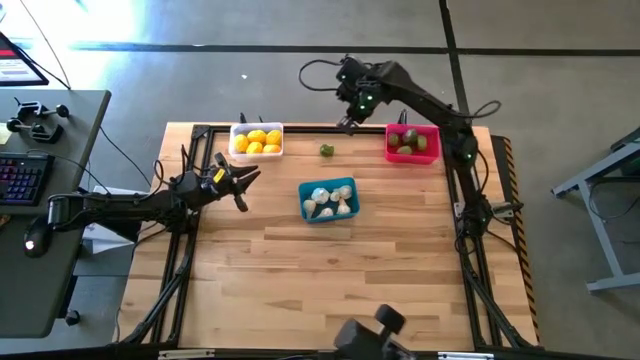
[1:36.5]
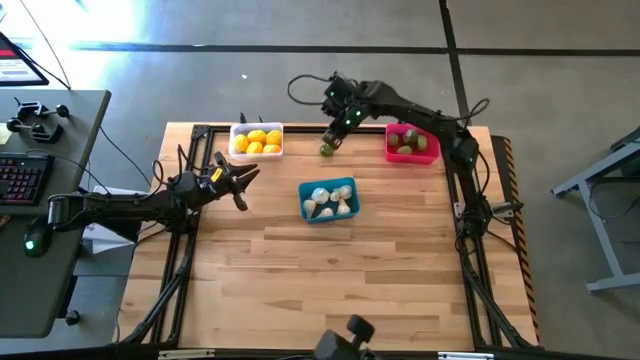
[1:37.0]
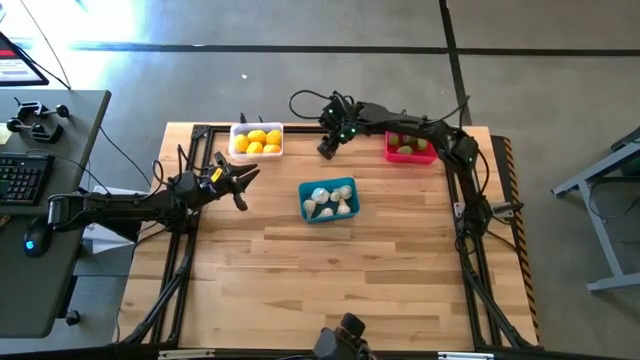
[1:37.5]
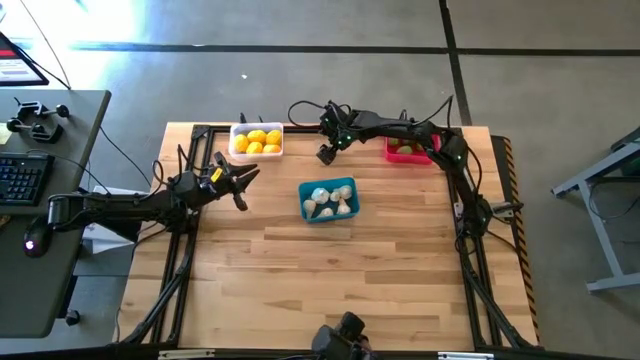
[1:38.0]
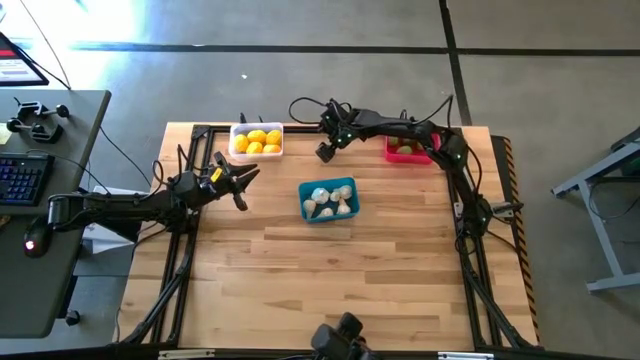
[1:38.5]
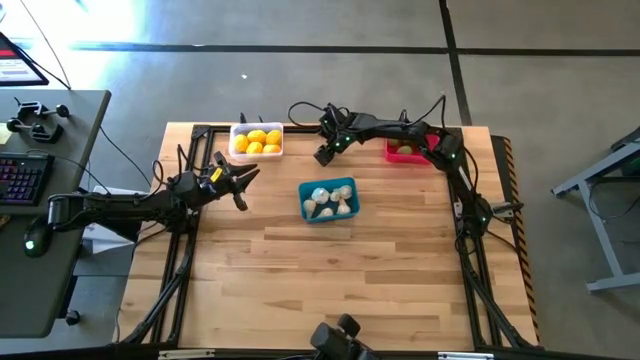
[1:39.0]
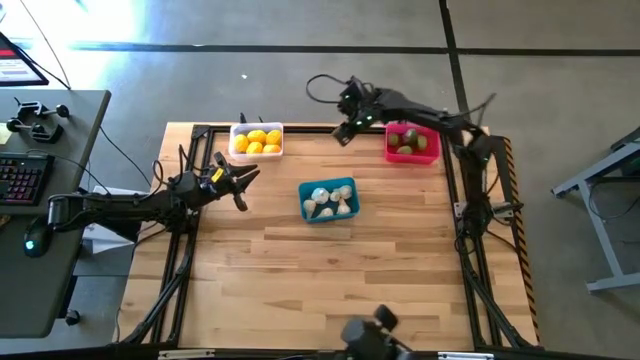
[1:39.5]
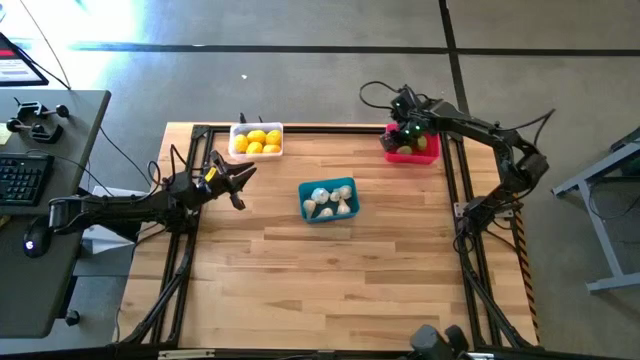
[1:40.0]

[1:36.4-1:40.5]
Task: Sort produce into baskets
Put the green lime into the pink bin

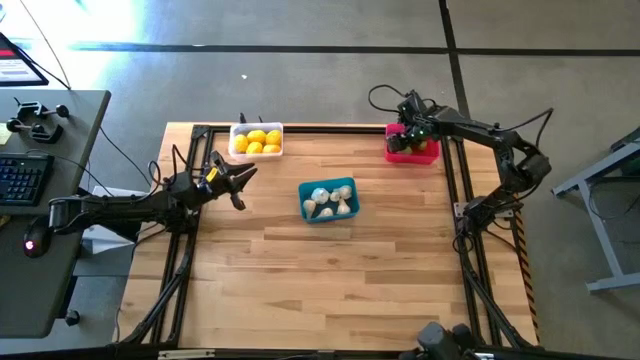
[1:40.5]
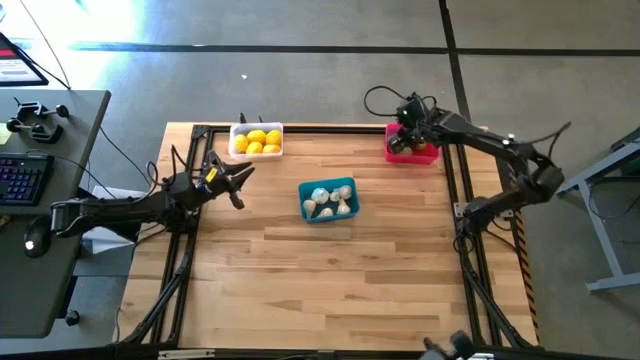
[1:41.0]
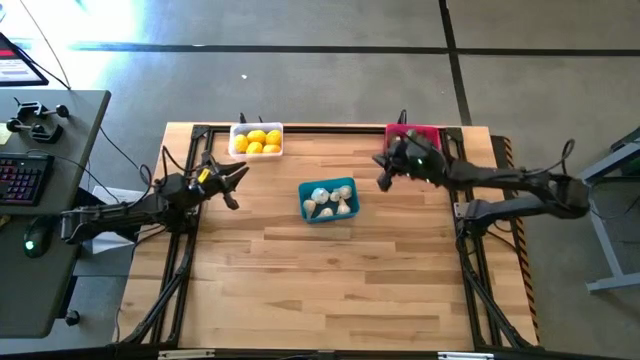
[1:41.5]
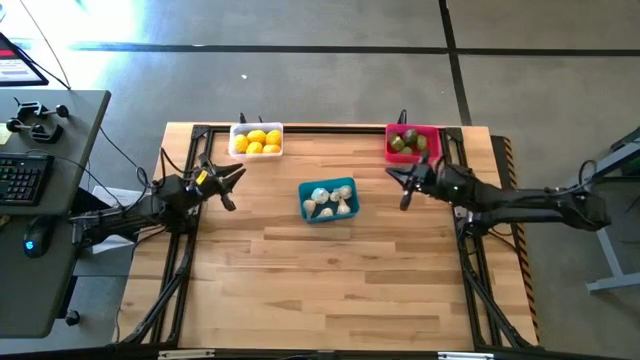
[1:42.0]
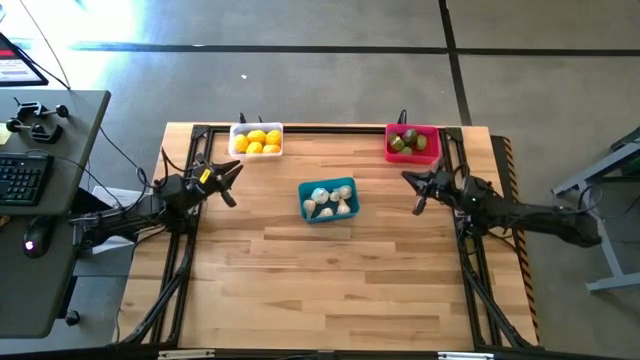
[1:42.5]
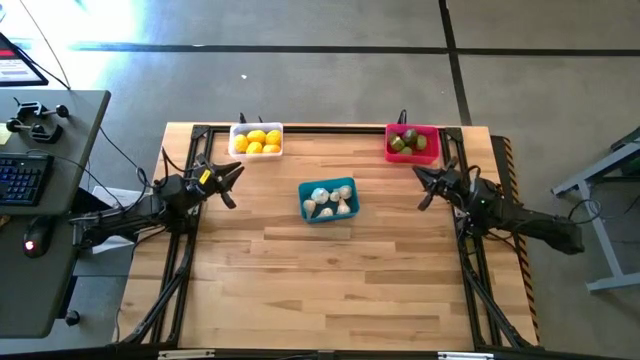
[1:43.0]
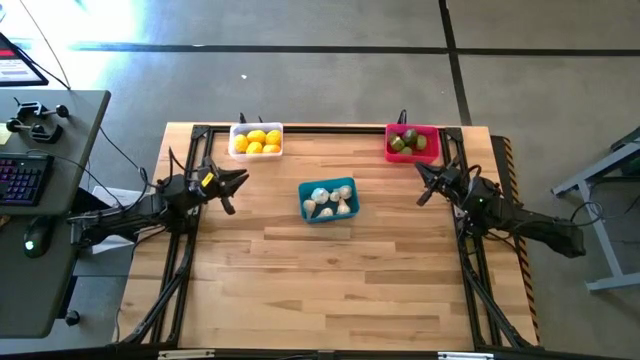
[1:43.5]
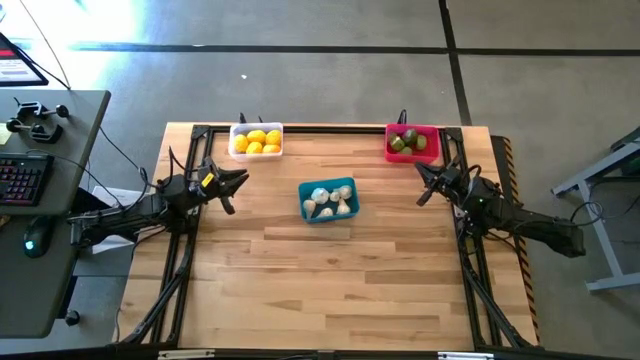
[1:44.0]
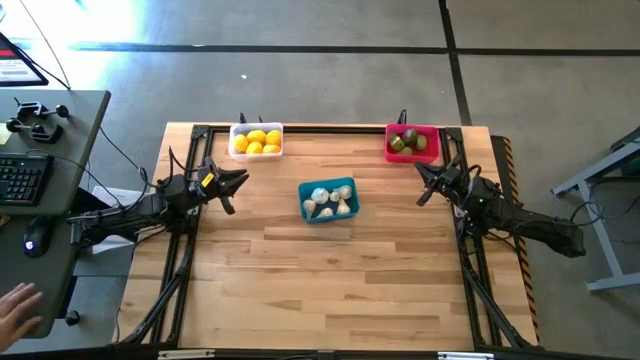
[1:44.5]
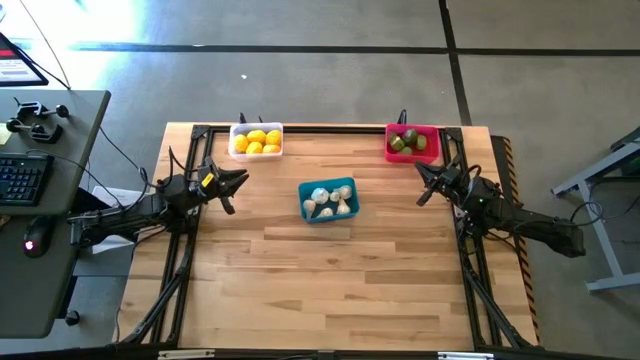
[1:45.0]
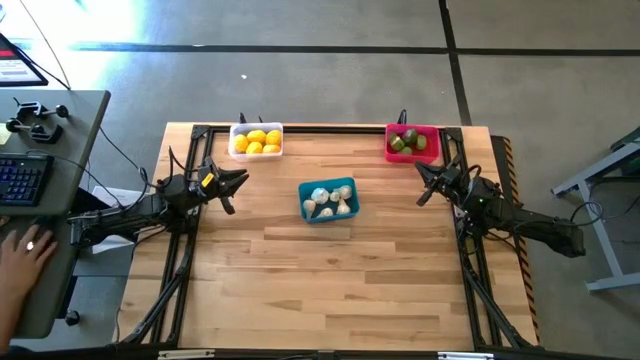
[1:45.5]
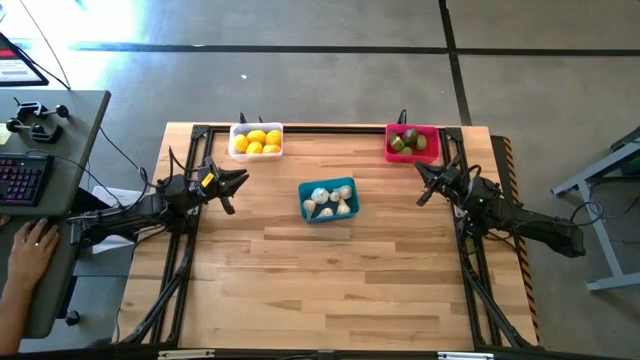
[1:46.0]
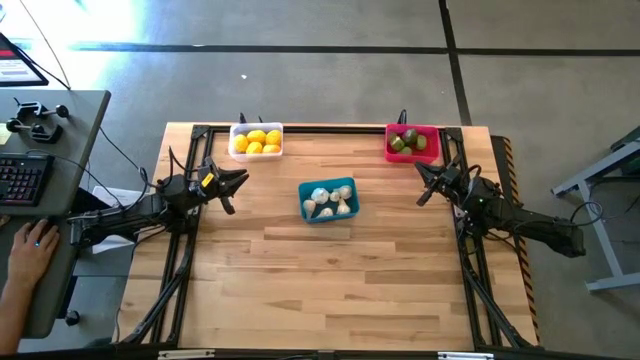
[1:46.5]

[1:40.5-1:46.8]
Return to Home Position

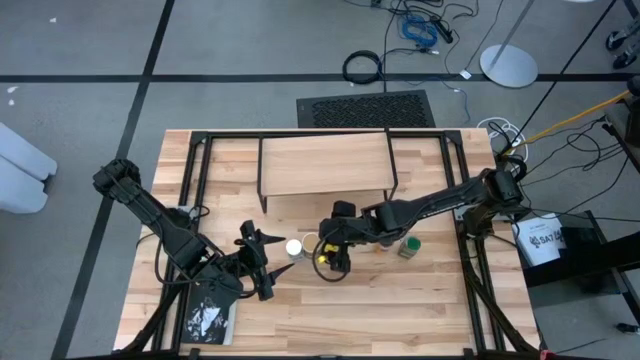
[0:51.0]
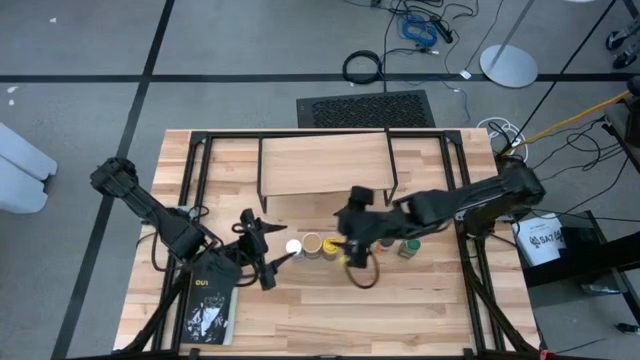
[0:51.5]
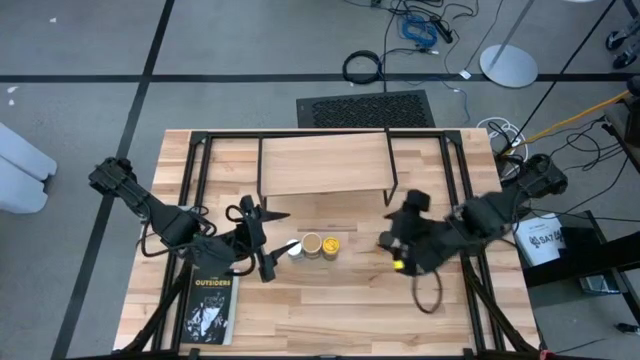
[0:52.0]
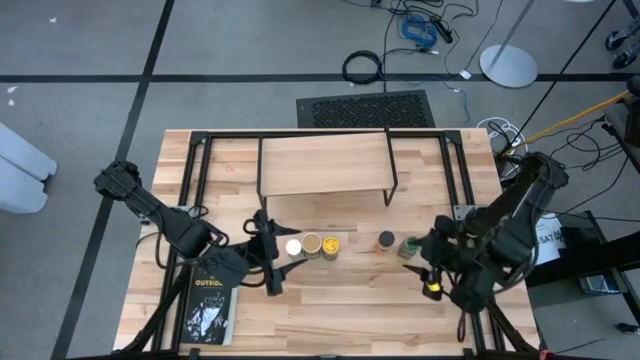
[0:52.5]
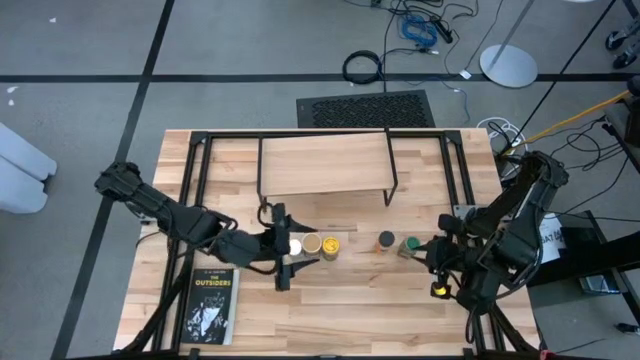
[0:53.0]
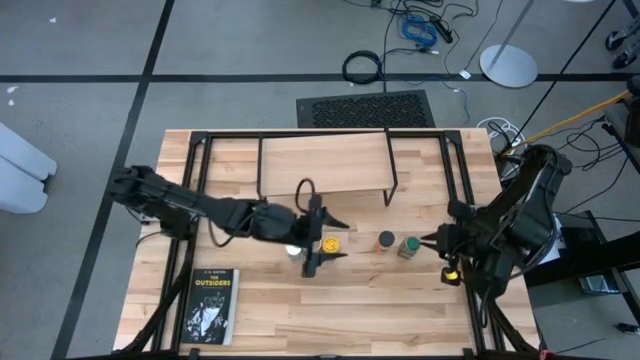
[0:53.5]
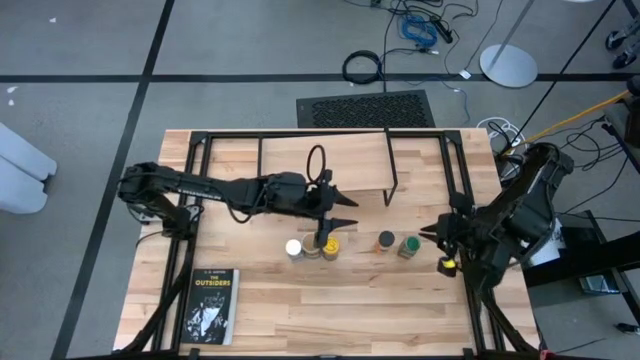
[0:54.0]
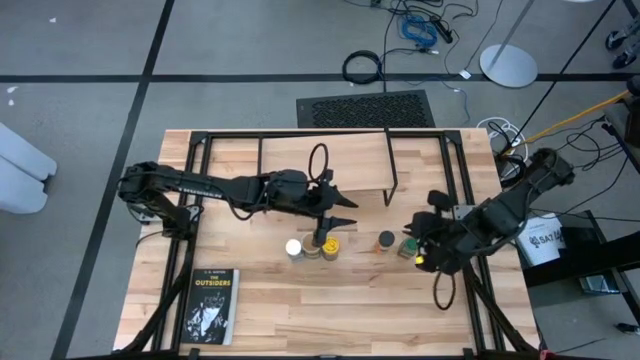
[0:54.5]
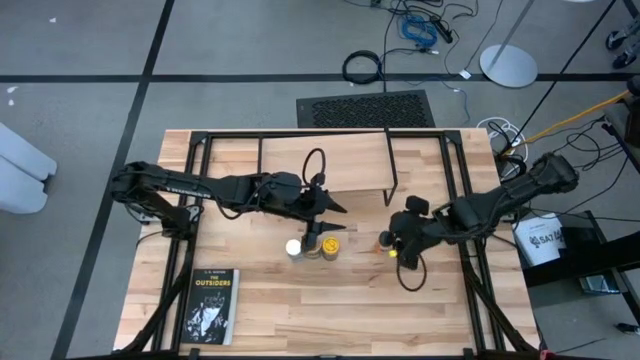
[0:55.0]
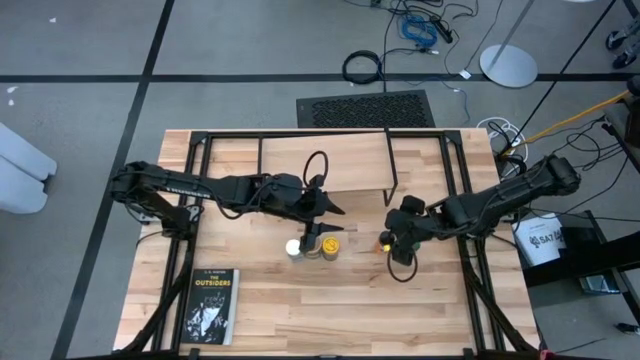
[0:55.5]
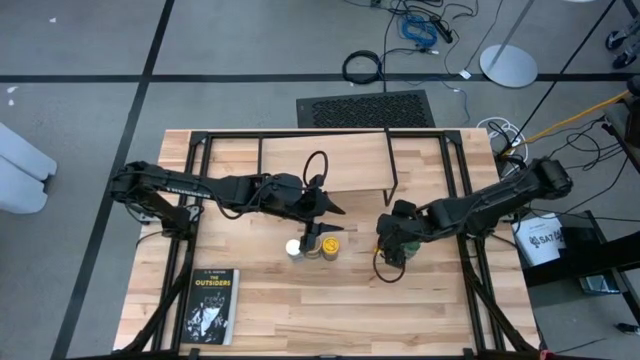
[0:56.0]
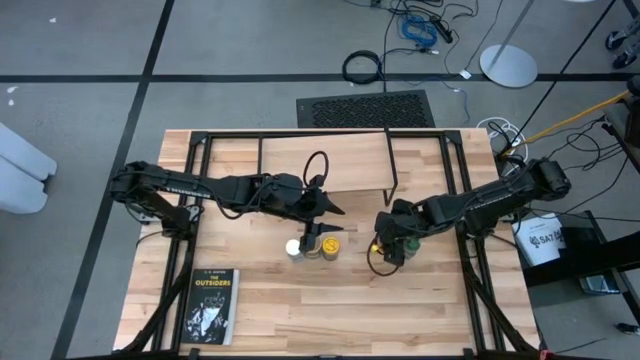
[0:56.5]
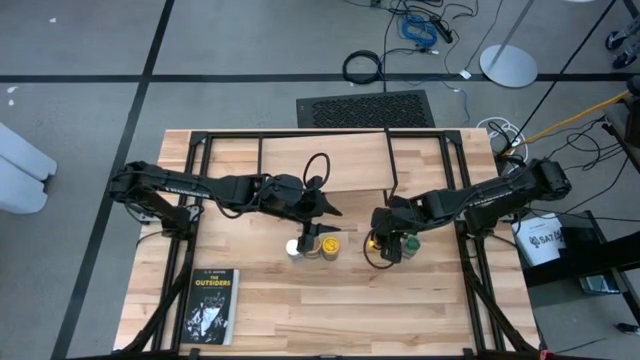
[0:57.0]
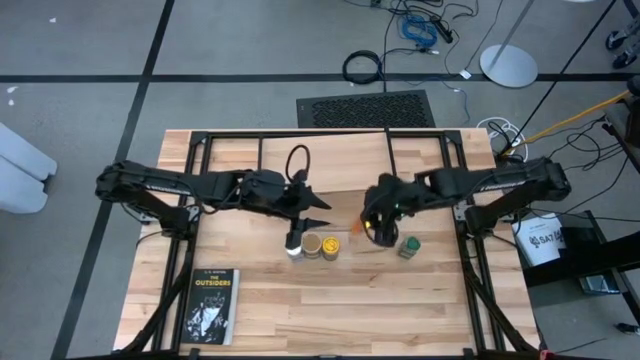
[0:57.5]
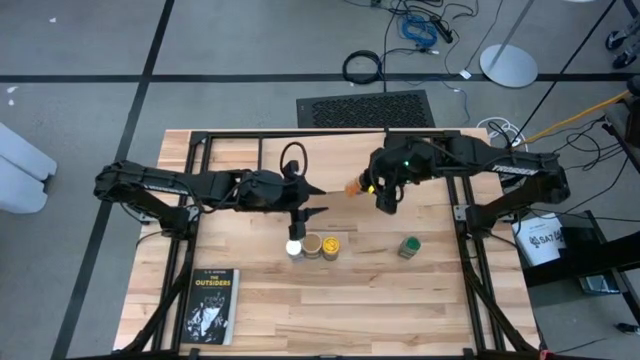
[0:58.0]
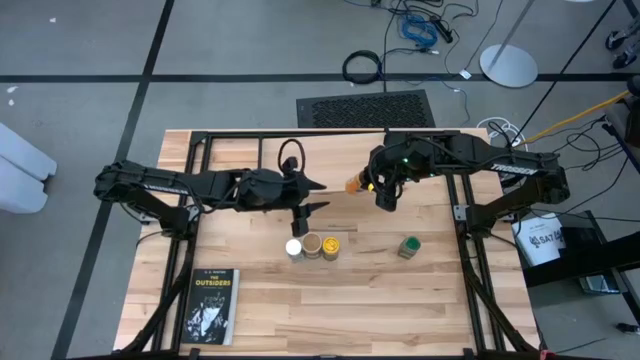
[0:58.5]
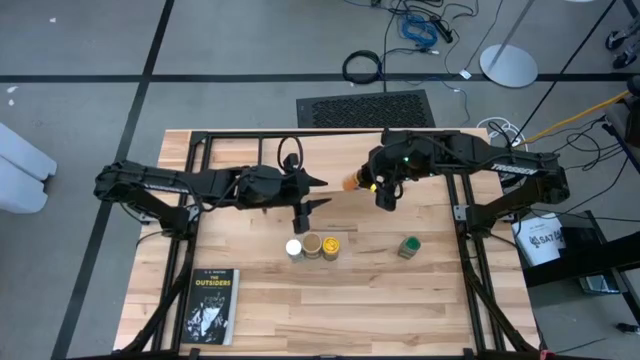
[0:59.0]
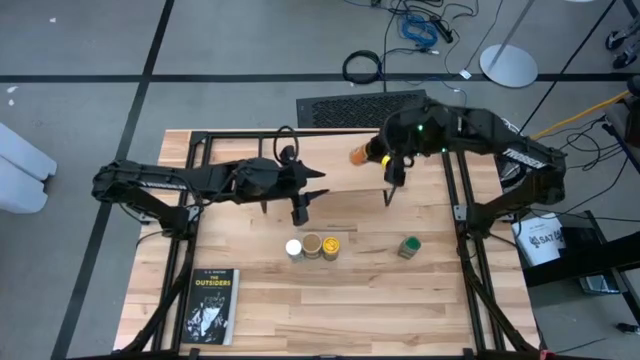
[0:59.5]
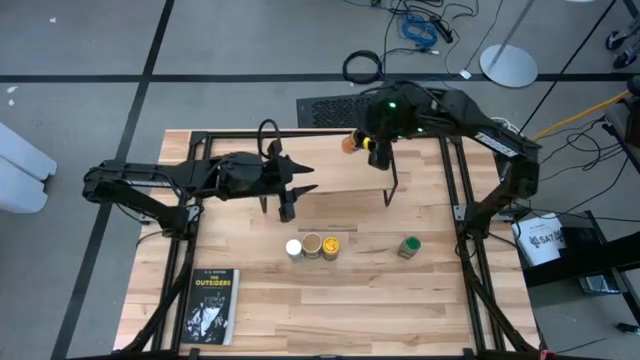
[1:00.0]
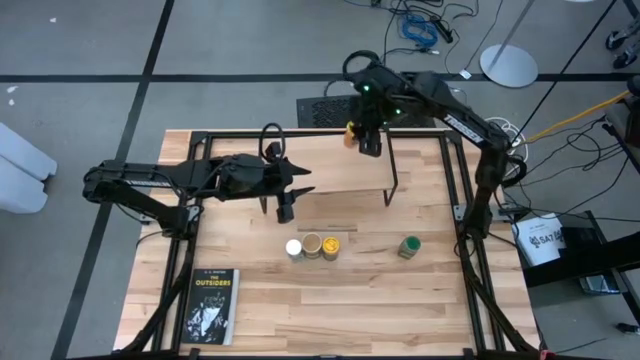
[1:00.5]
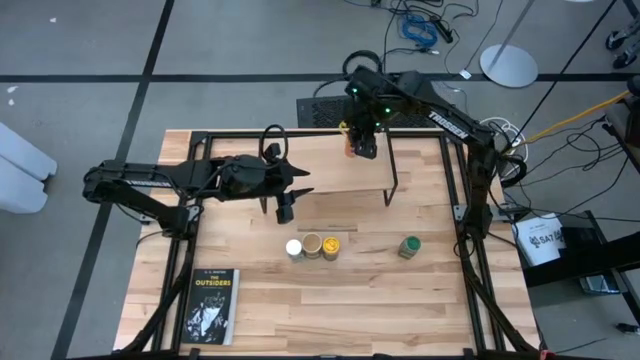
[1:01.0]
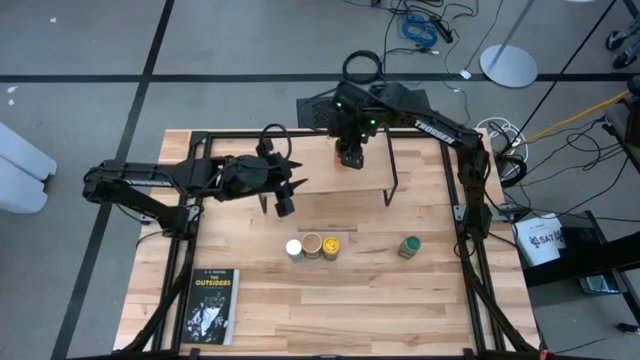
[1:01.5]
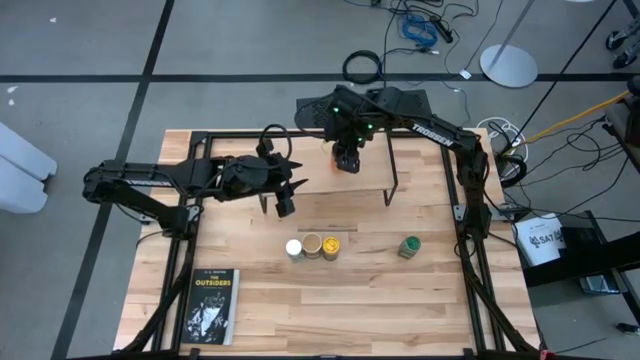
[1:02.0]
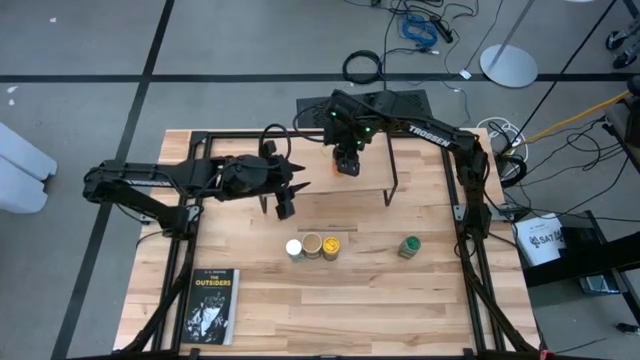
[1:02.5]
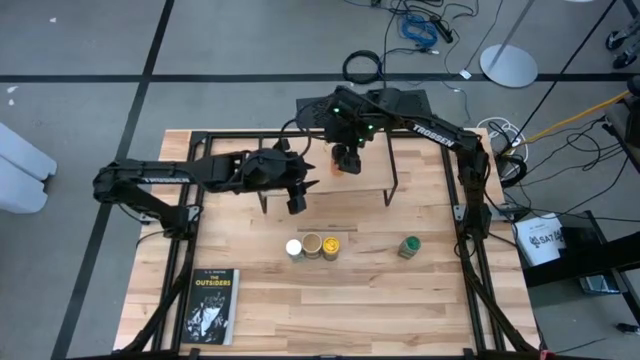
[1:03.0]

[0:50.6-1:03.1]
Task: Shelf spices
Put the black orange seasoning bottle on the shelf
